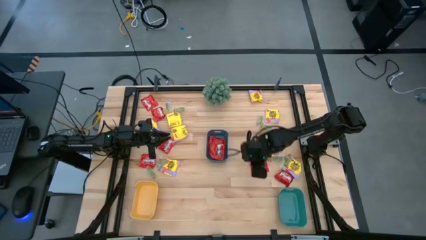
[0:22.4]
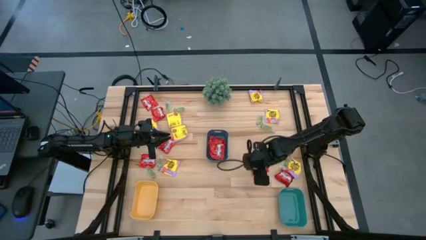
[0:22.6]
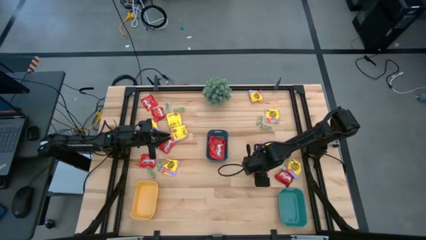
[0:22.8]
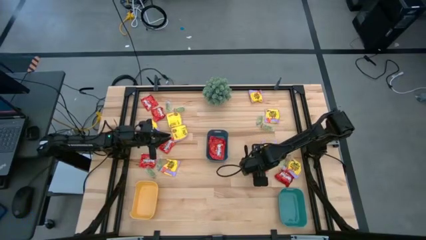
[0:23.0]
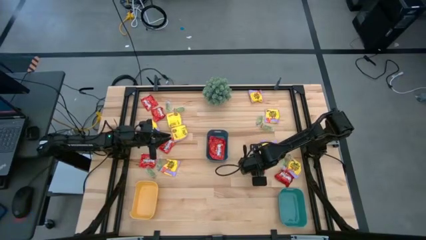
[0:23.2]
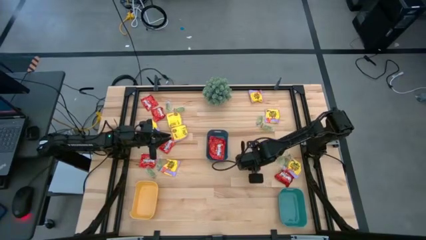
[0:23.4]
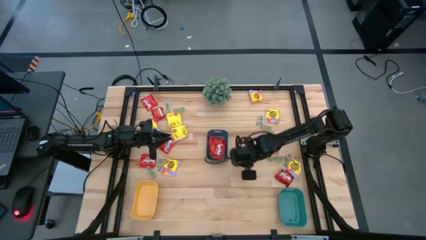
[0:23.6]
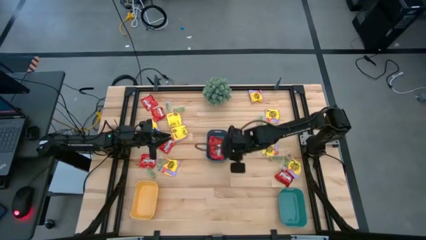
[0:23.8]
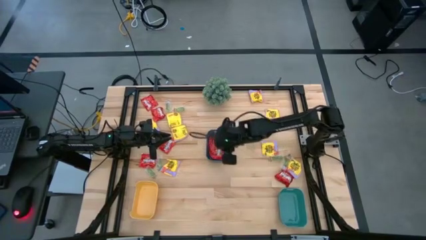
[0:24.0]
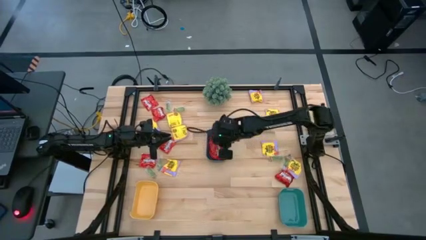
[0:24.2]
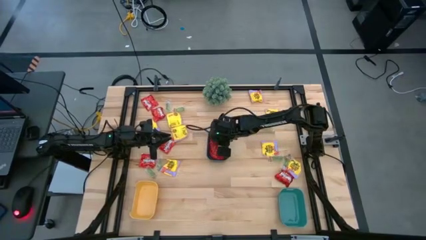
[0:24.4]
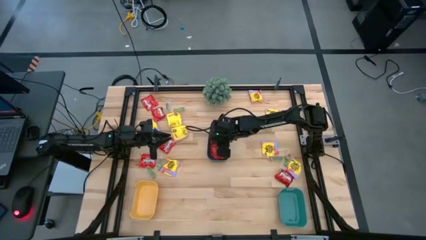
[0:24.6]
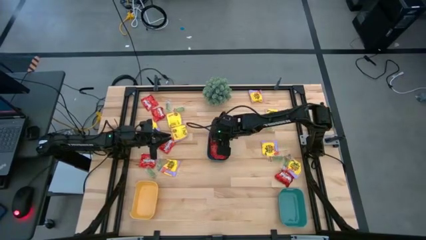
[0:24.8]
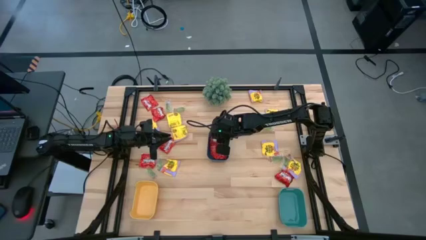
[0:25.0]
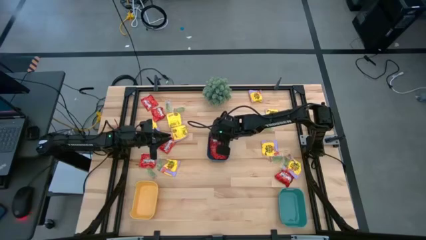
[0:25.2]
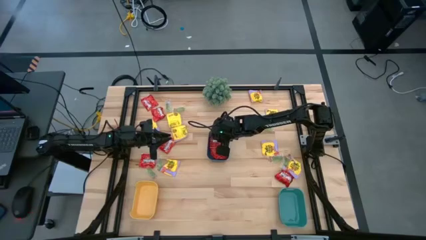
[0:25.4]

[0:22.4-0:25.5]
Task: Sort candy
Put the red candy pack into the blue bin

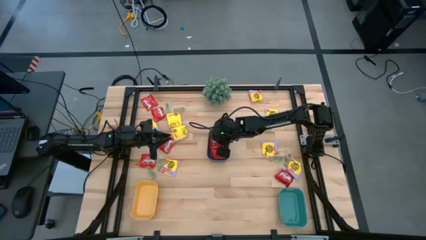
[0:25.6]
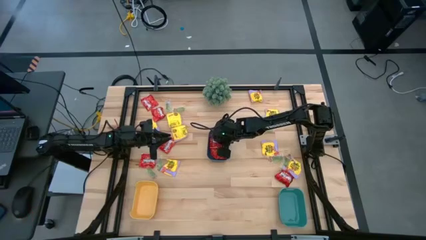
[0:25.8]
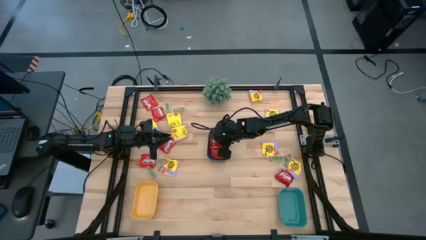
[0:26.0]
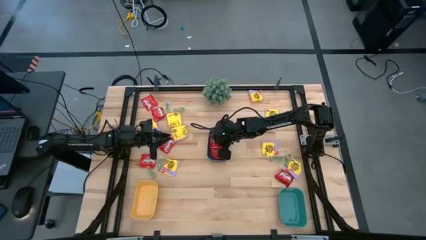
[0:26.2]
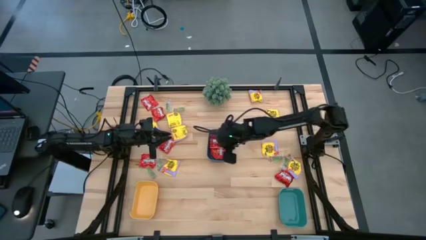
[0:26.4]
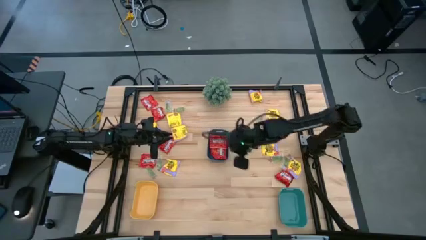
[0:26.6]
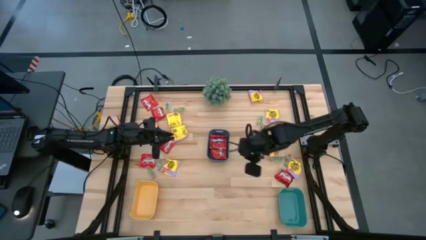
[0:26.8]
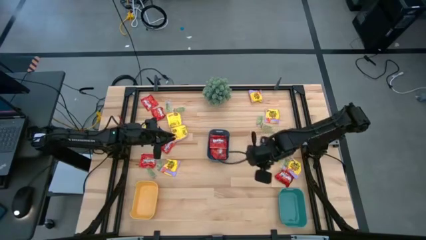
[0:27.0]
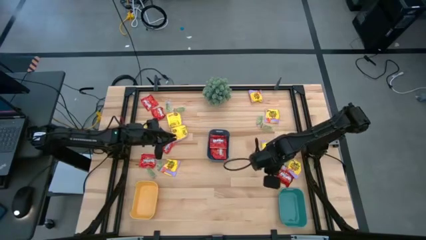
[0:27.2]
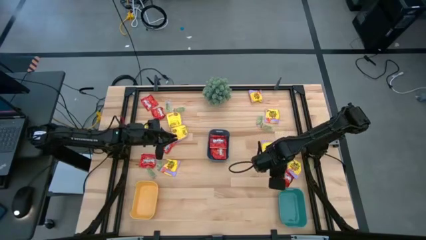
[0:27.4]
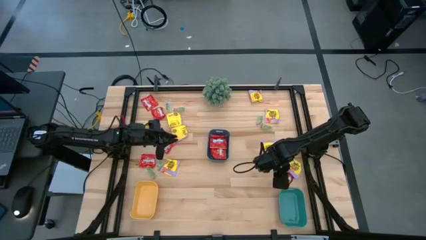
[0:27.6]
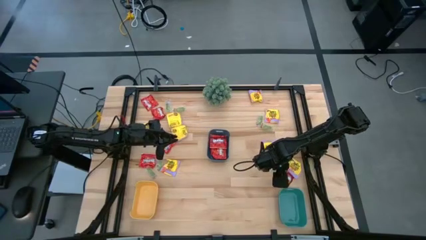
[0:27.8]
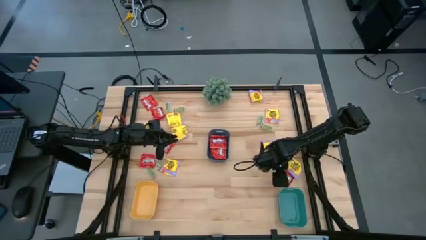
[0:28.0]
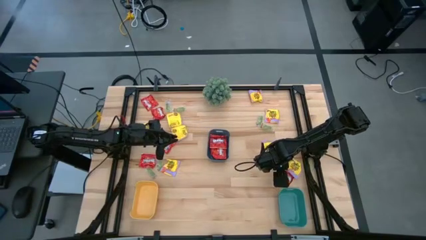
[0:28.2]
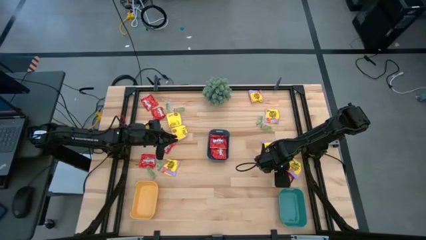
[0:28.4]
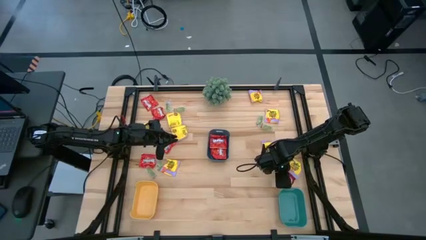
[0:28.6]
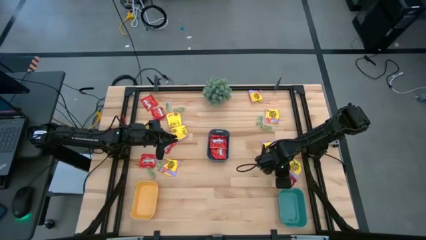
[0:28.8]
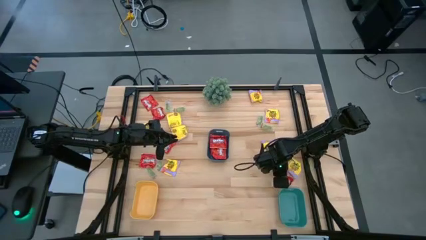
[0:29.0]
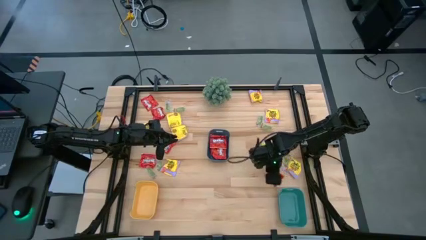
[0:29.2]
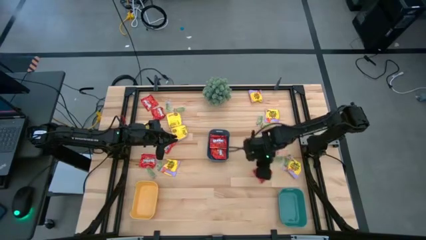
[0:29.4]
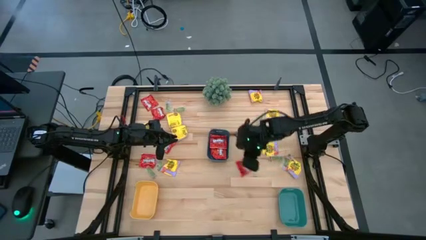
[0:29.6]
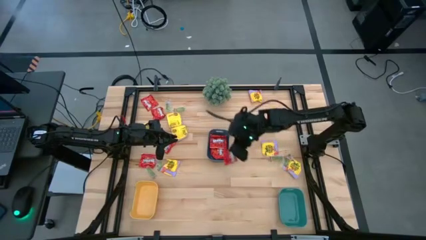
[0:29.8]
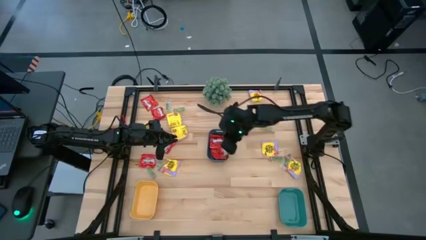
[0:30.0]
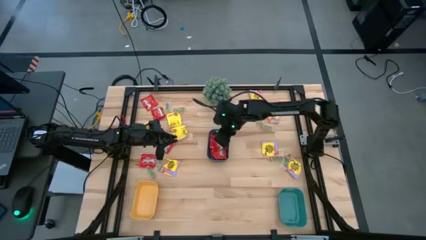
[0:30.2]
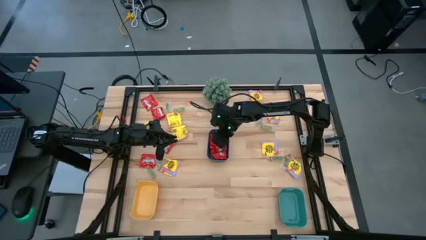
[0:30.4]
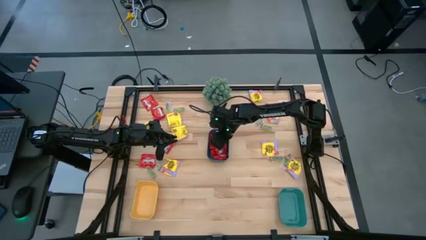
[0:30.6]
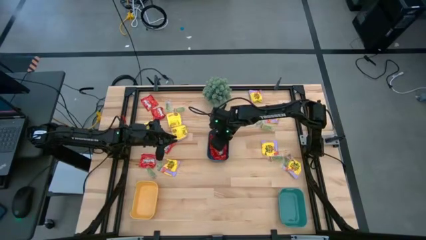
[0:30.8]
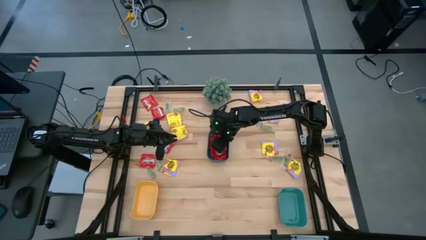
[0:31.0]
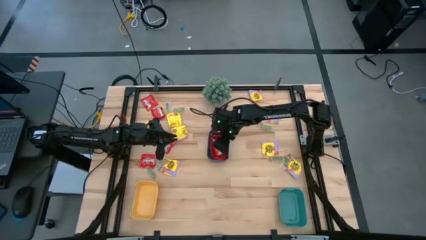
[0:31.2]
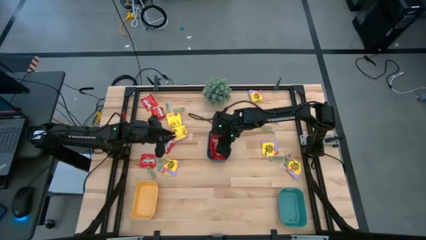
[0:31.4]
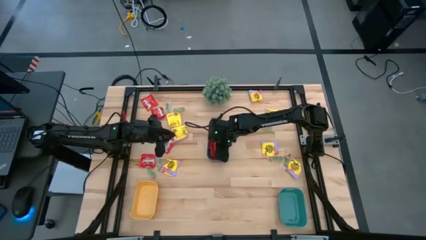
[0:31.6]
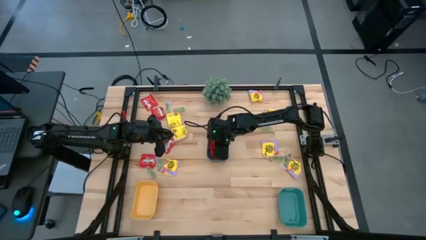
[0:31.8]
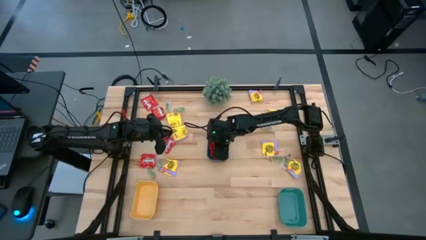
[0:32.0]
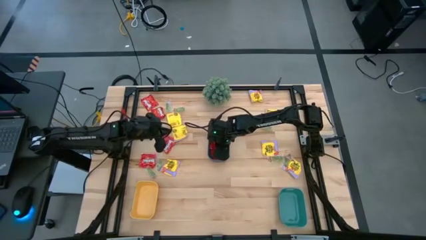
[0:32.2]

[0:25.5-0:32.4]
Put the red candy pack into the blue bin

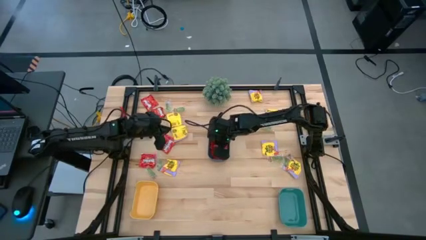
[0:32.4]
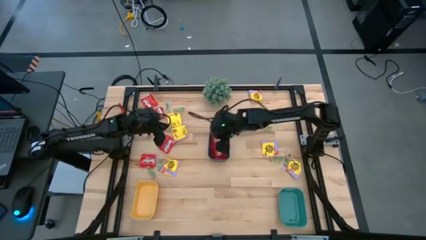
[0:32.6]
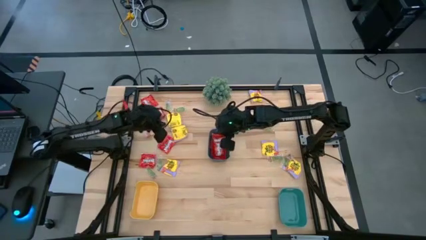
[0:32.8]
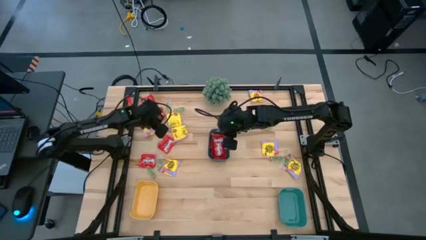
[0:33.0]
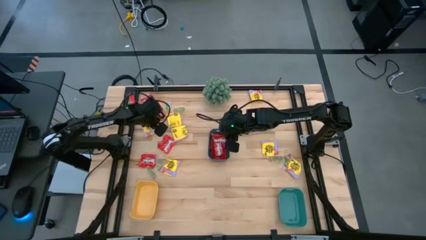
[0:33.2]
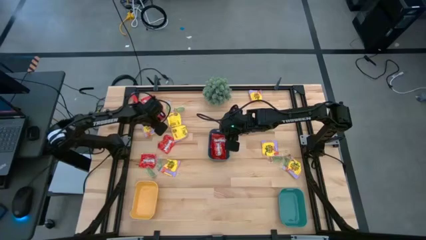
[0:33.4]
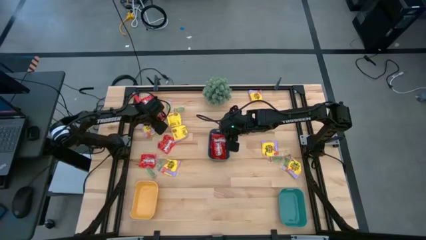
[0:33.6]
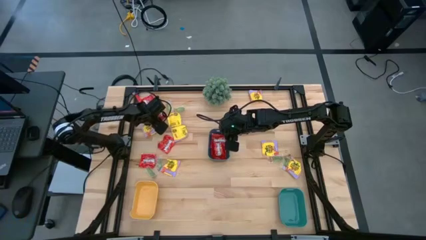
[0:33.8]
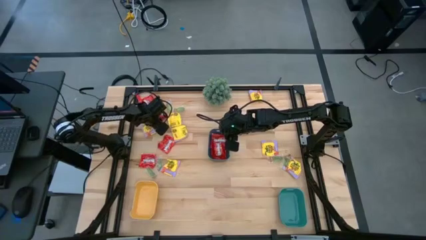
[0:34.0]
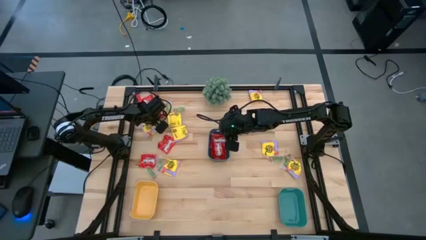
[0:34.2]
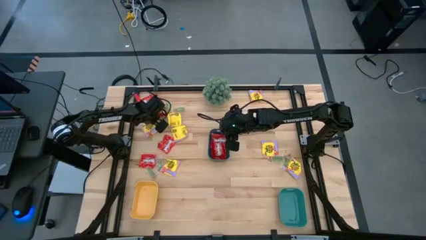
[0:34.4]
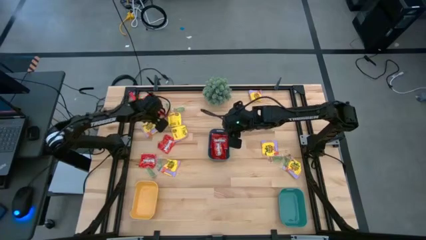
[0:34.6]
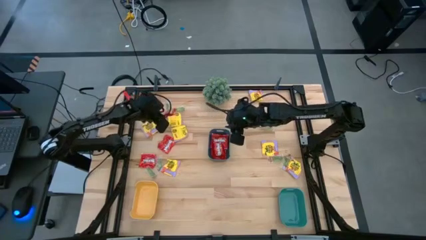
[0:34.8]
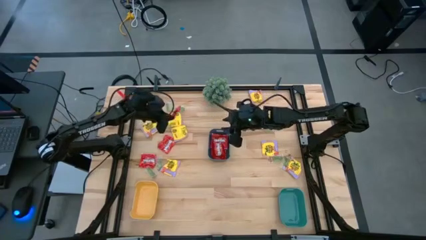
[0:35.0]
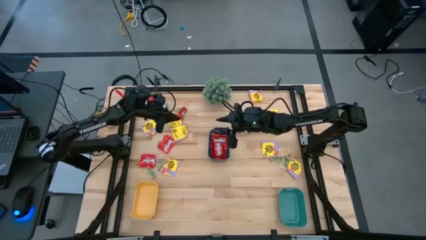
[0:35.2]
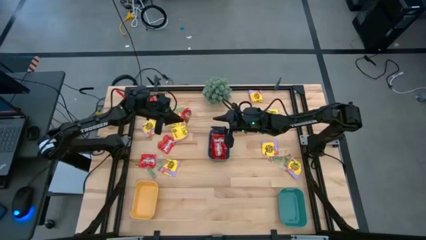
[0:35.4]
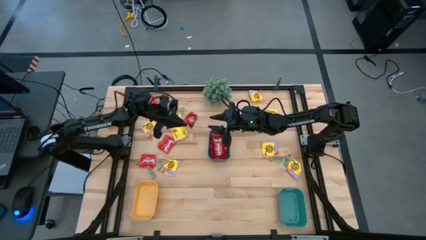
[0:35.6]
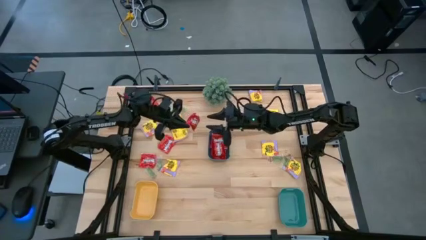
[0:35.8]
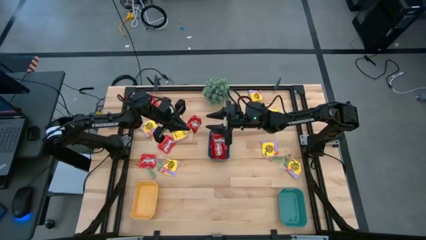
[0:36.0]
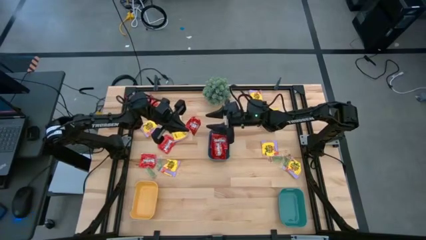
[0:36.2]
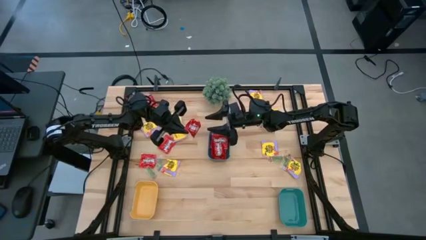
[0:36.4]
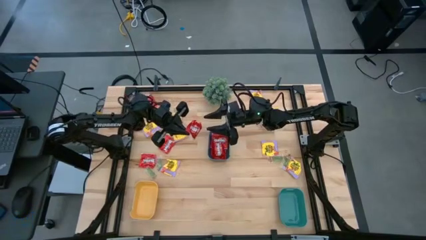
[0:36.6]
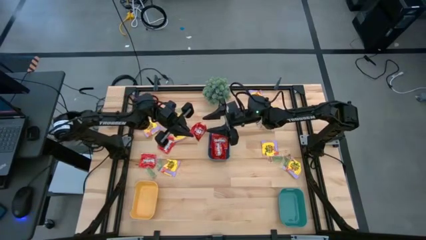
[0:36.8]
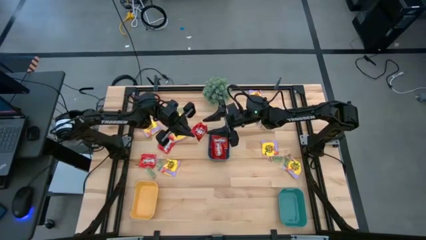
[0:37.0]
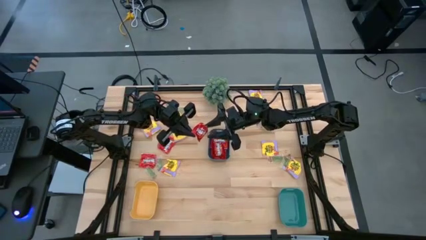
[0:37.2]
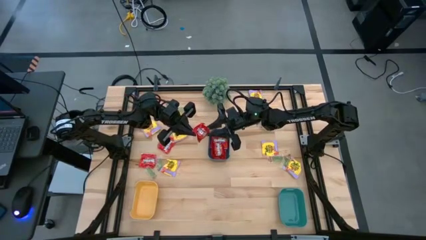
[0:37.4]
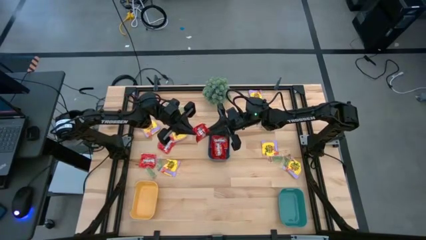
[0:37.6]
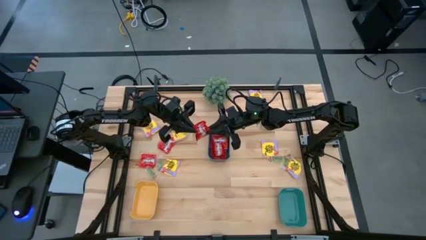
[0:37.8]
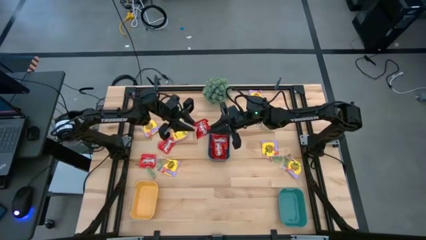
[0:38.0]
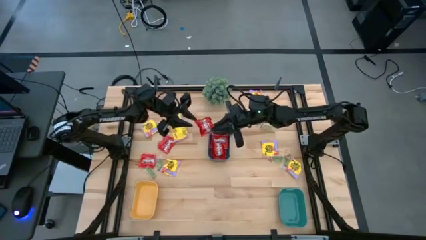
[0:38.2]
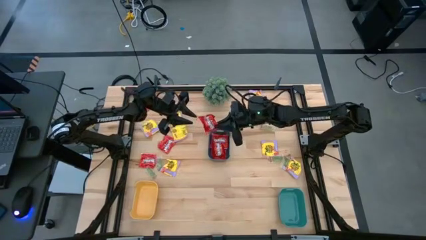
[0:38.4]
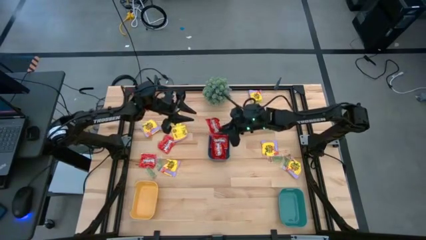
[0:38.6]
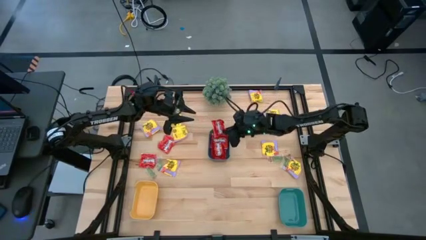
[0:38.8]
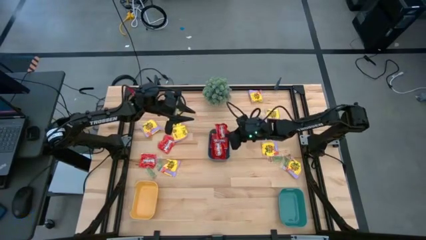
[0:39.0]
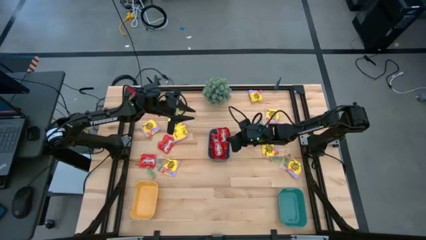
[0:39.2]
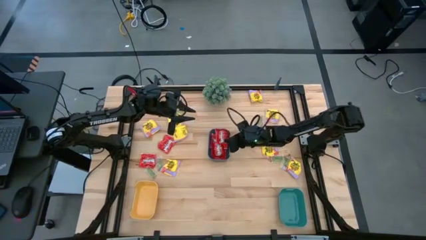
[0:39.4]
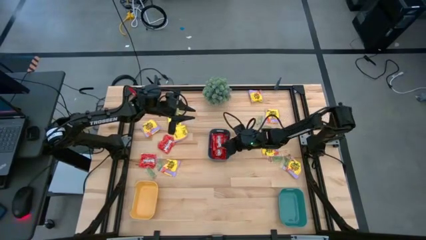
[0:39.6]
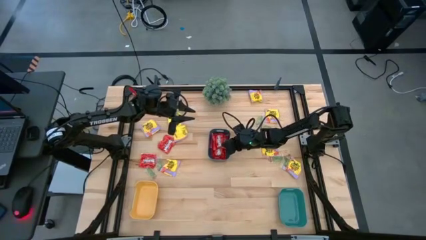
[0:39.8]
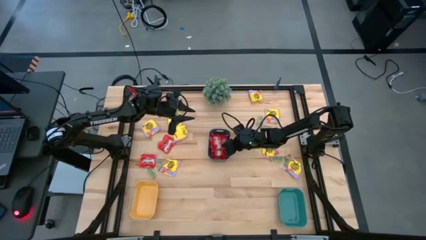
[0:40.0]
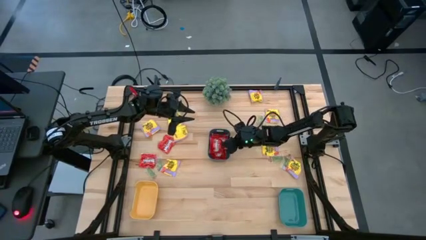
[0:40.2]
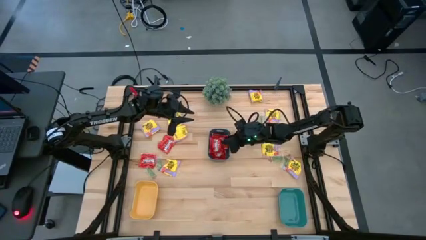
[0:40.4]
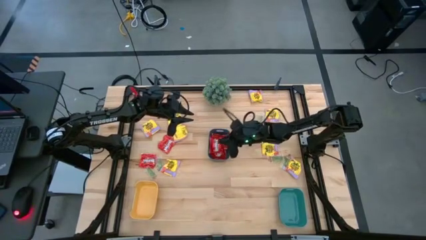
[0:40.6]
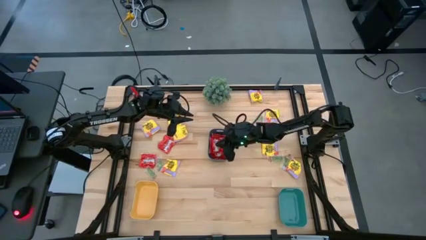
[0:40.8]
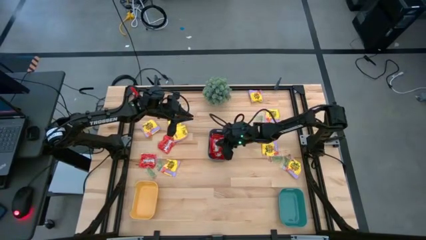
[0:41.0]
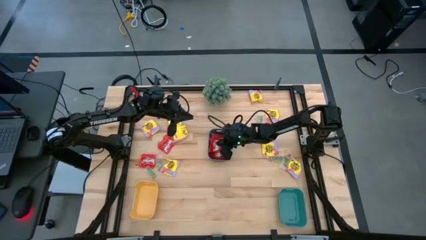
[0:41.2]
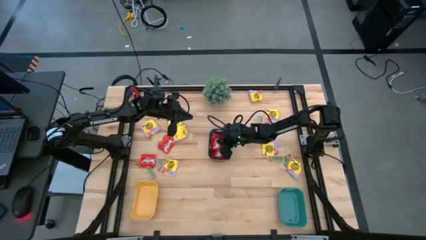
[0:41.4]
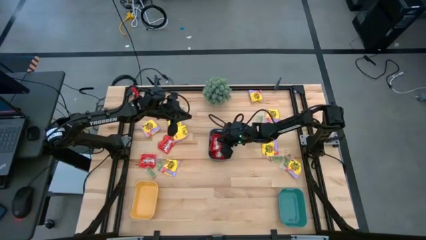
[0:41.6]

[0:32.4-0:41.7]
Put the red candy pack into the blue bin
